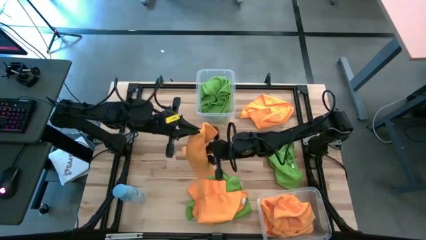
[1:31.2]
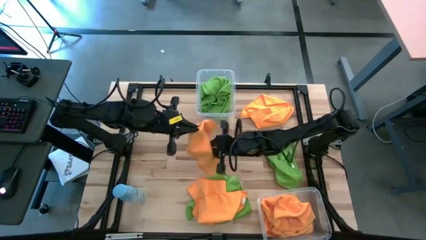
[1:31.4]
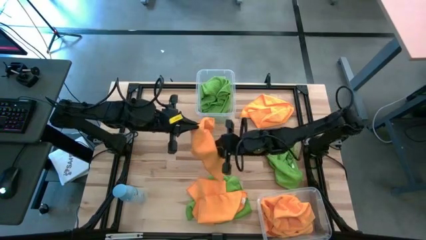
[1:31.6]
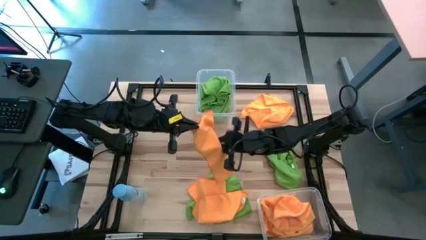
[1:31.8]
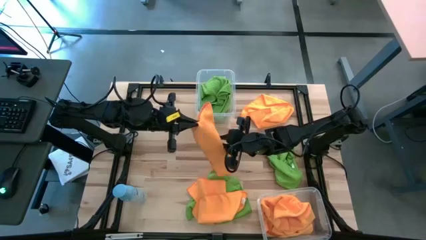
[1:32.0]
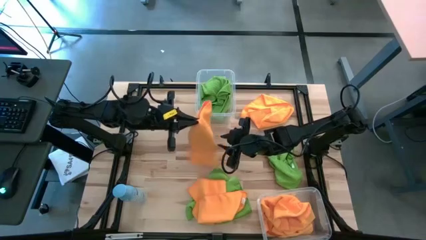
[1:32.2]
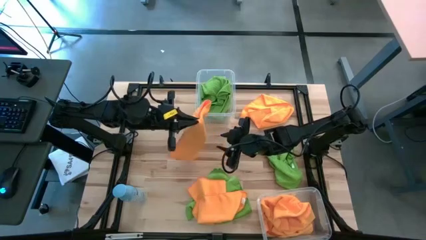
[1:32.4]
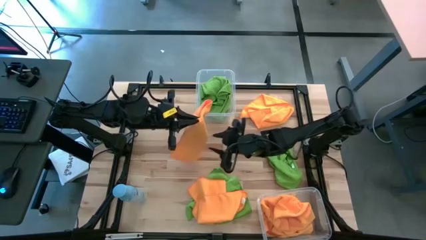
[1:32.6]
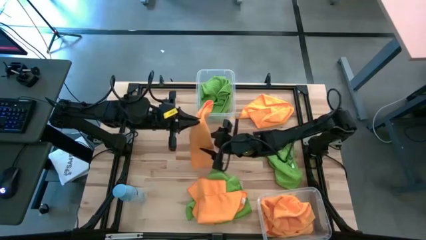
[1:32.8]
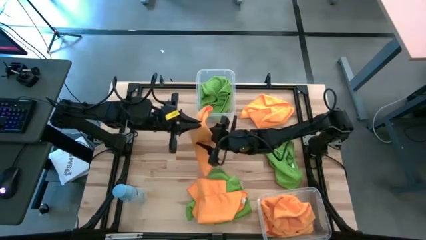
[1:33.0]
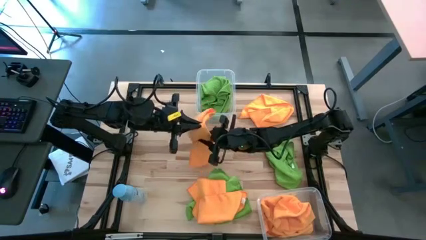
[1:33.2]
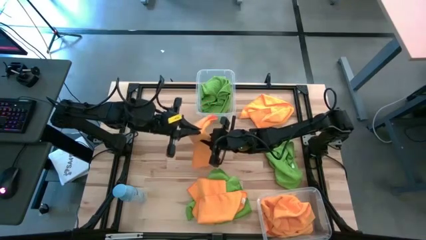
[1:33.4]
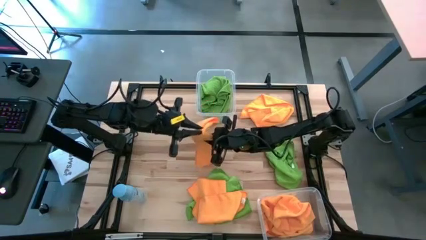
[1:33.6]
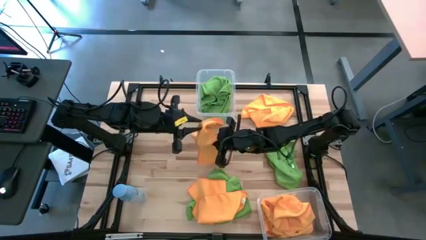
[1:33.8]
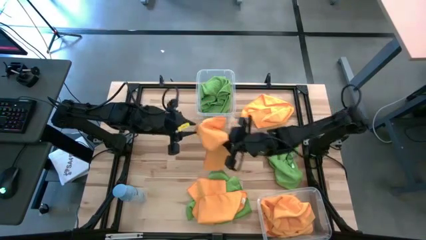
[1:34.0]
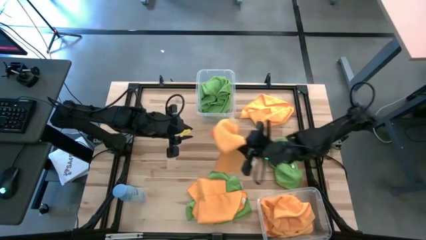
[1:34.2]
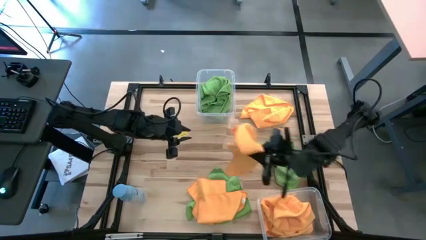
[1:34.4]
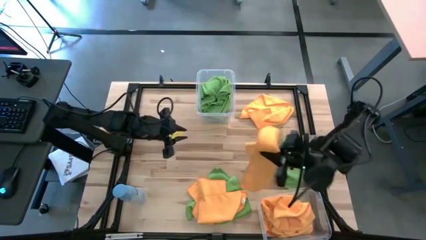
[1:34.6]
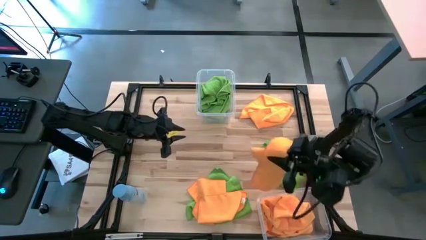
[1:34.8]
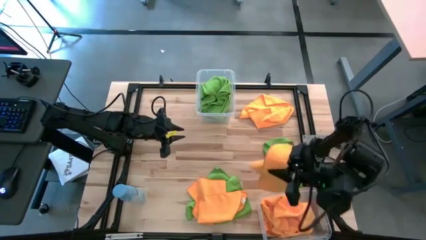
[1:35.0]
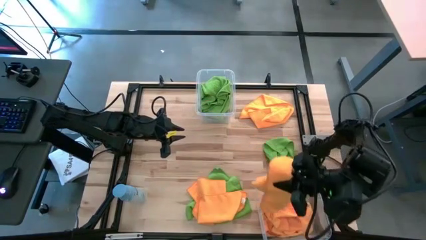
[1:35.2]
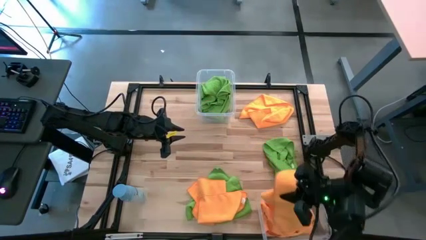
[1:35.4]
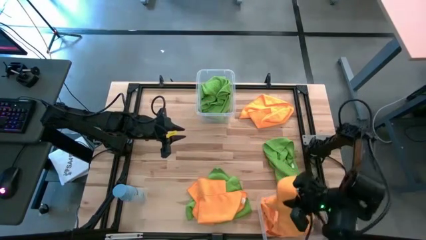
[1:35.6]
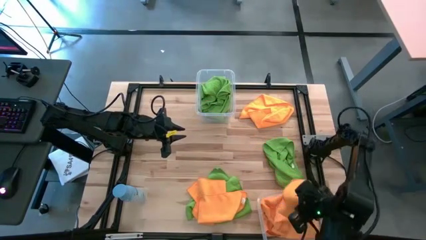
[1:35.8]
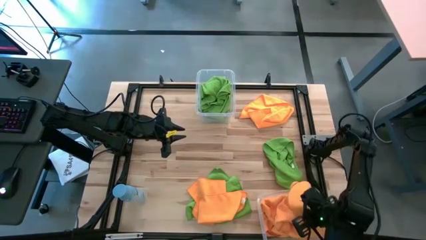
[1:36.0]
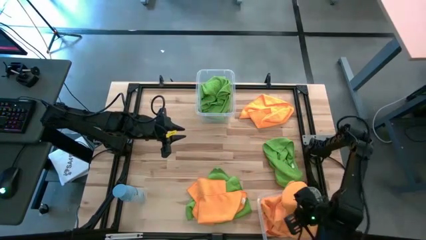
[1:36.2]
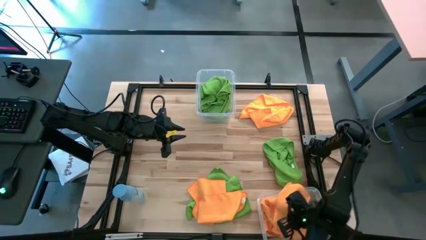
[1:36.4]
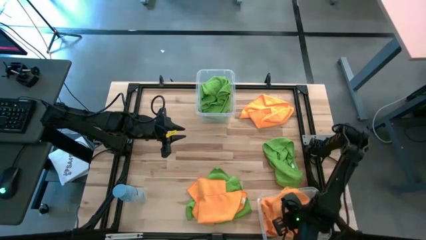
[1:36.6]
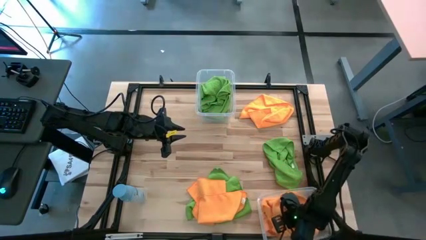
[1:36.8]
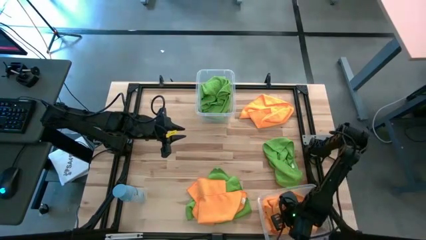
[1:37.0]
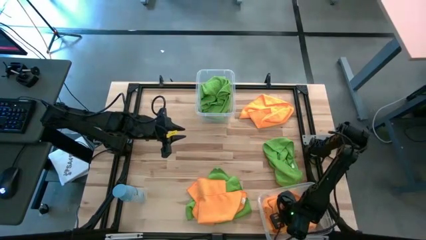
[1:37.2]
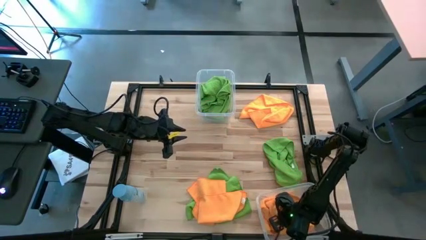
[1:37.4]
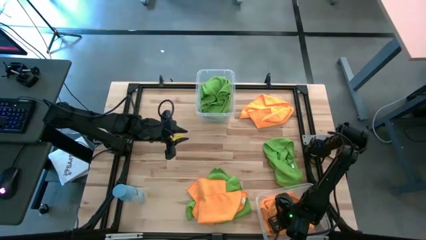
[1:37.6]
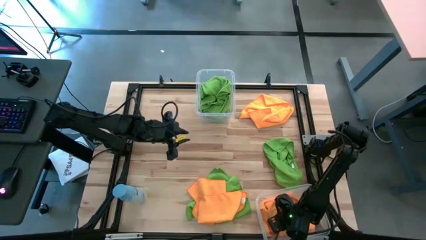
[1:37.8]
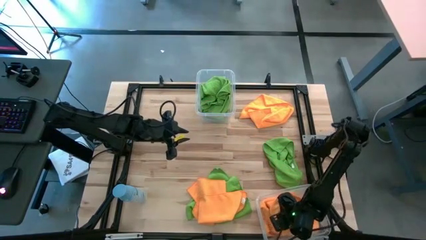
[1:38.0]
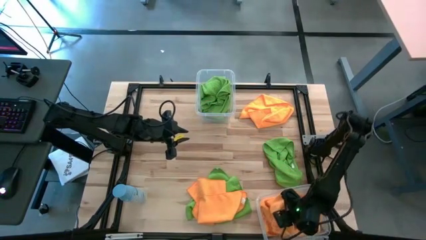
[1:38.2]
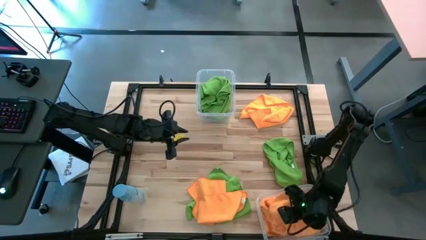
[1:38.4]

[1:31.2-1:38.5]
Task: Sort microfiber towel by color & place in baskets
Put the orange microfiber towel into the bottom transparent bin

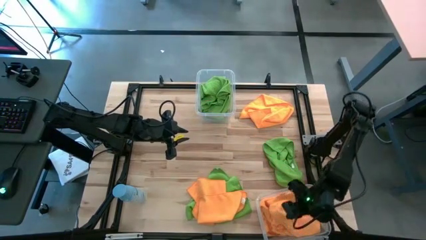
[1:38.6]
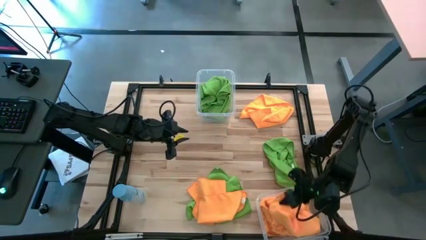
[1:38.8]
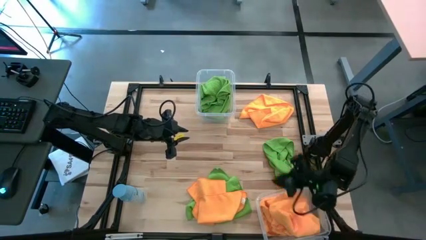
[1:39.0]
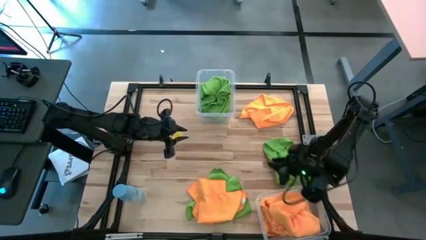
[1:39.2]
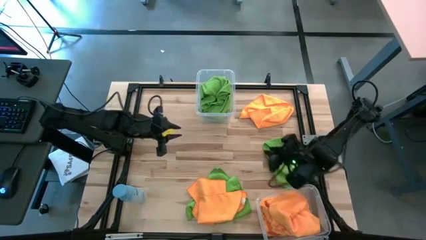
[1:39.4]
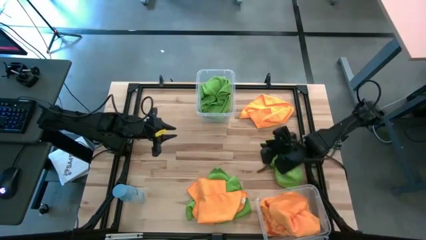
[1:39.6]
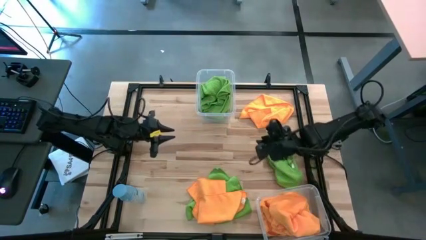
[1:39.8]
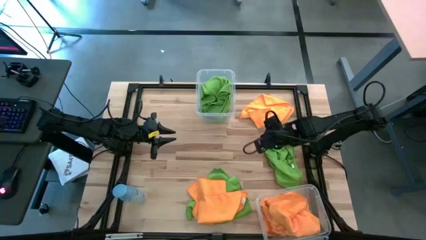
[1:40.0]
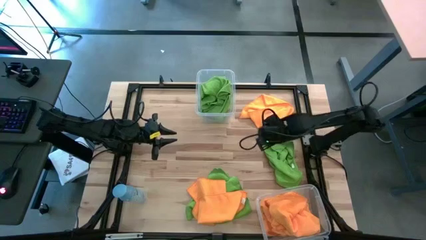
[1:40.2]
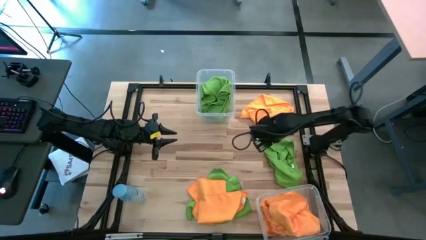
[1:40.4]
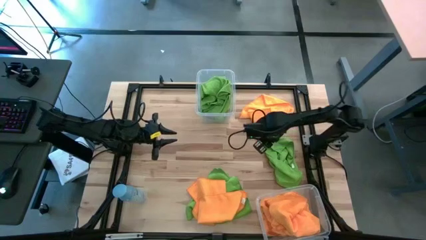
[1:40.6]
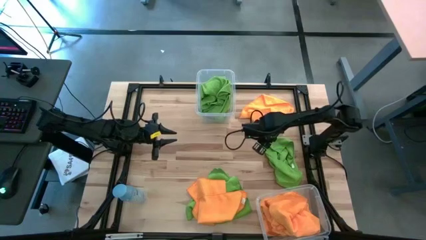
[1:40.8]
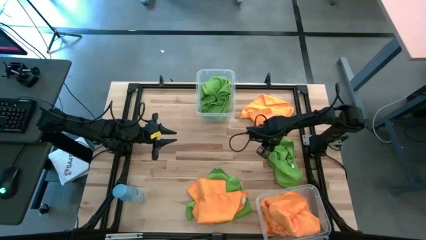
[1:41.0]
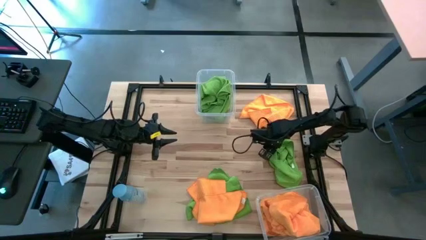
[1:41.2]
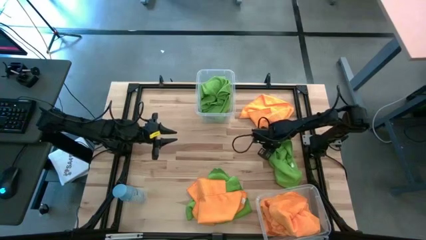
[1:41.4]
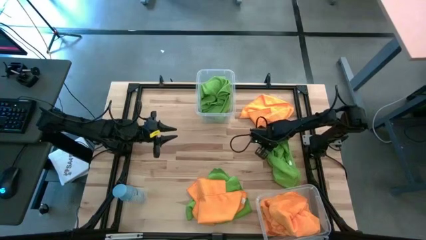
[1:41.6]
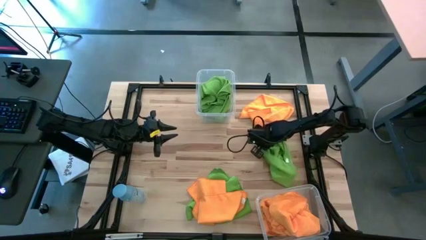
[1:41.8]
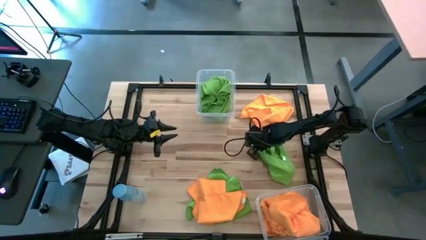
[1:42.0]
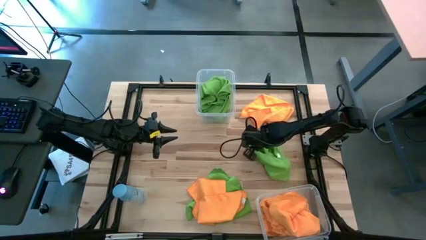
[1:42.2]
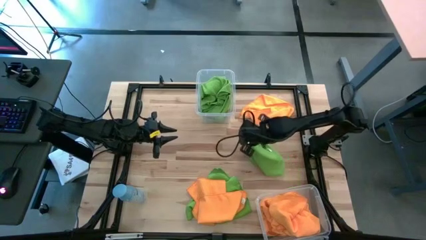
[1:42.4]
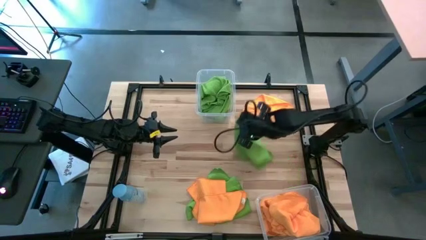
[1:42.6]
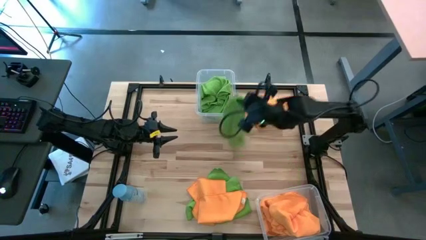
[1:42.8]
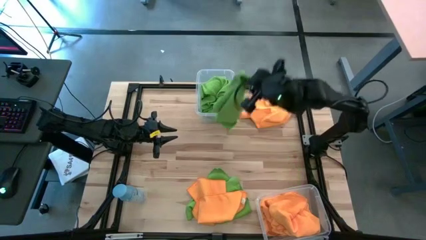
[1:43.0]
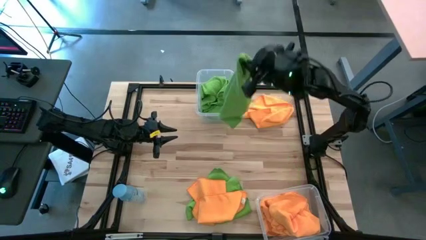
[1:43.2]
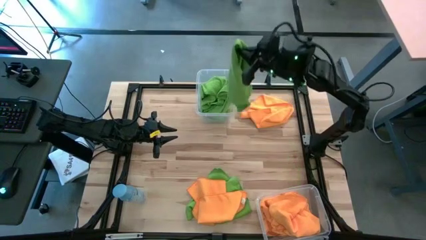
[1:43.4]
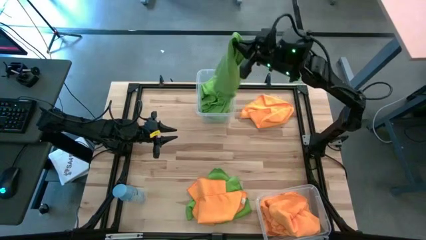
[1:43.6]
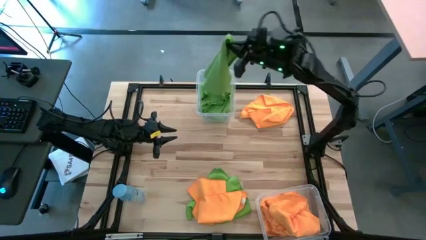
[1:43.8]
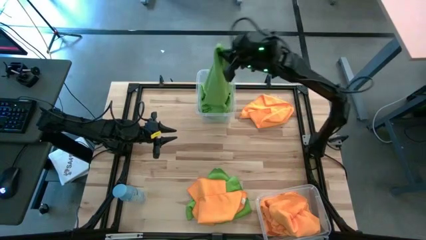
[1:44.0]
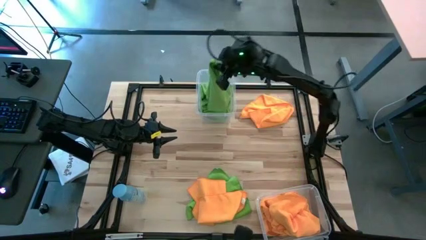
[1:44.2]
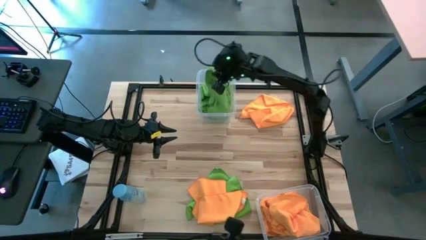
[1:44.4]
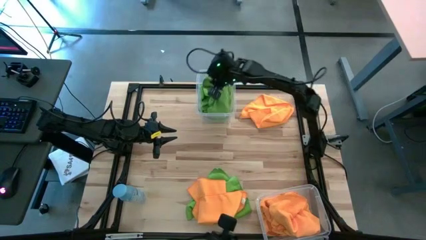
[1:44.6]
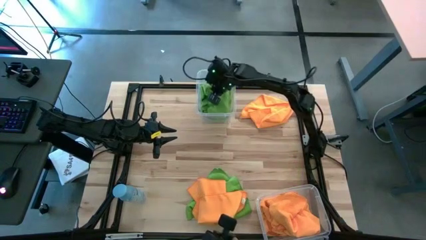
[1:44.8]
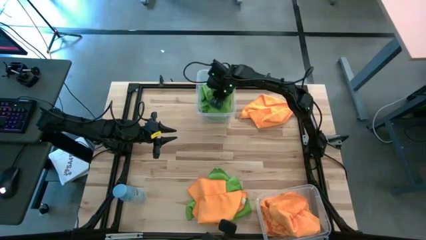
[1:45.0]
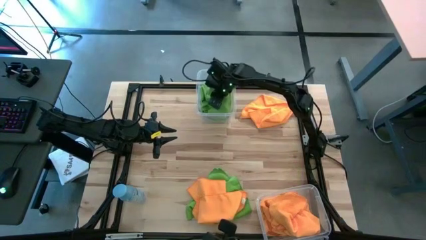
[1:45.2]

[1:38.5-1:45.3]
Put the green microfiber towel into the top transparent bin
